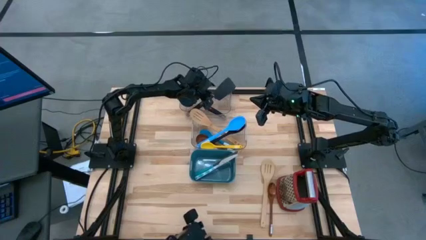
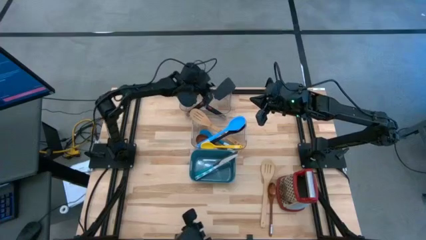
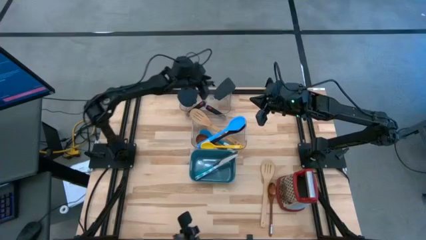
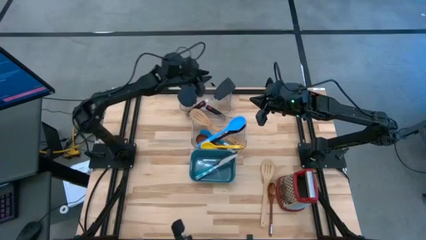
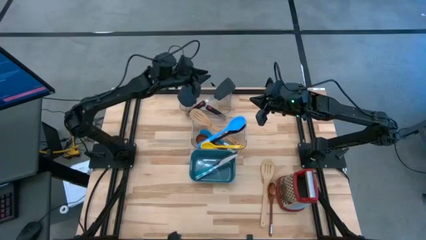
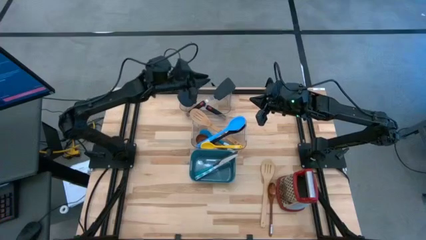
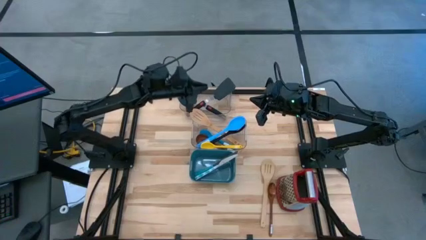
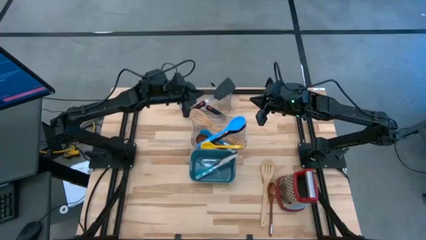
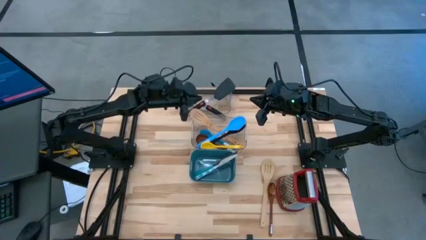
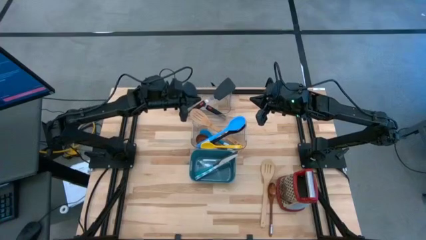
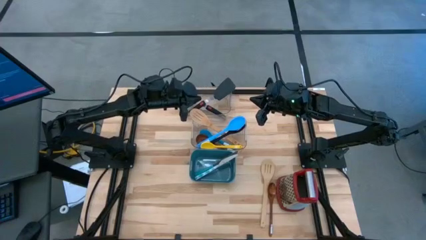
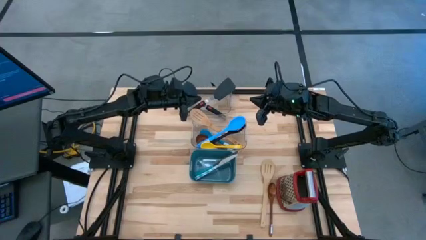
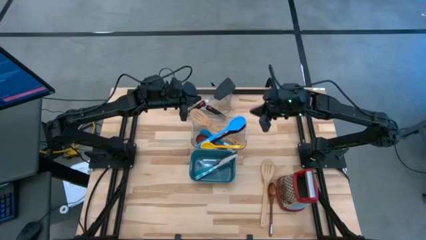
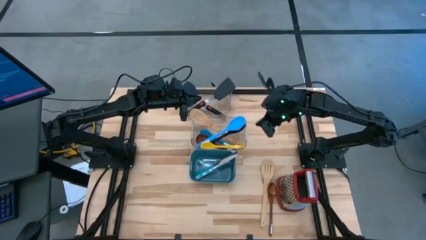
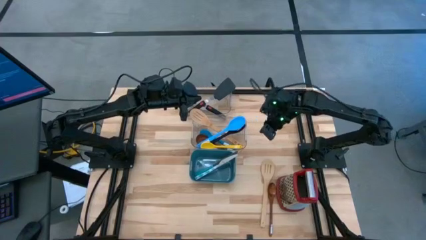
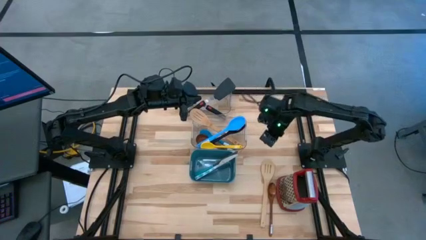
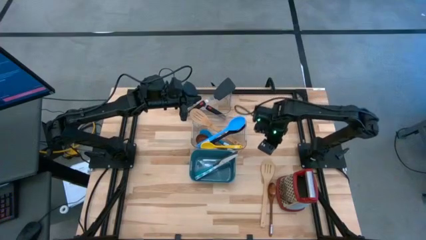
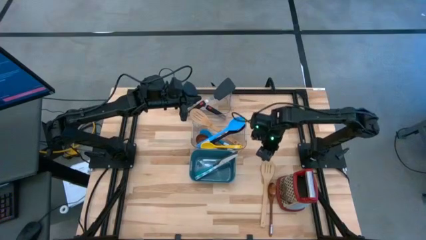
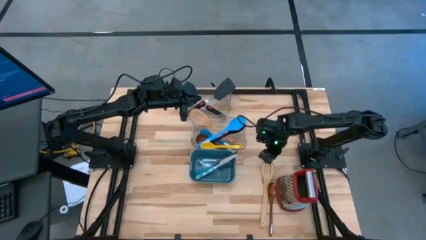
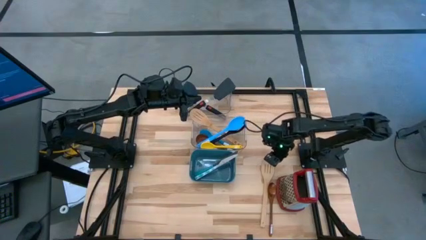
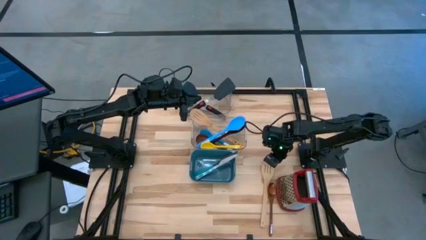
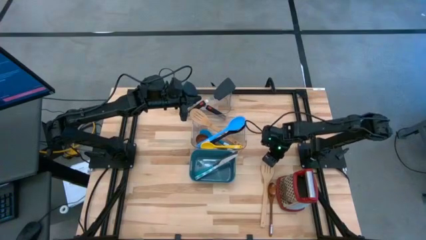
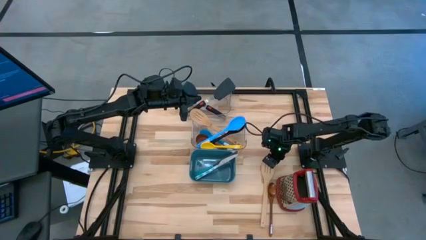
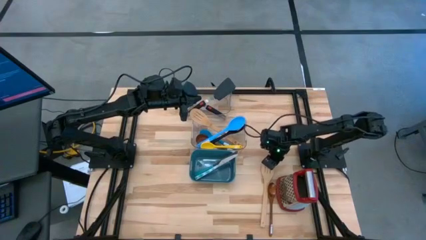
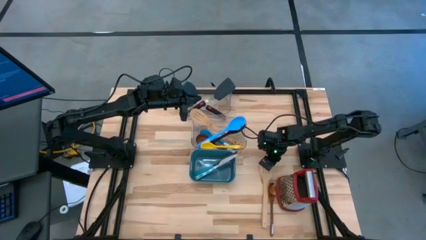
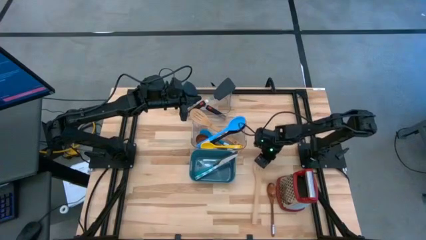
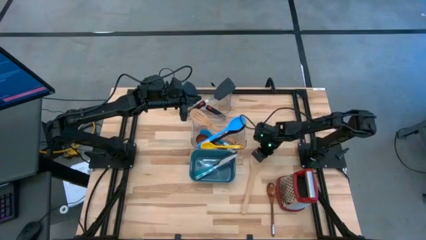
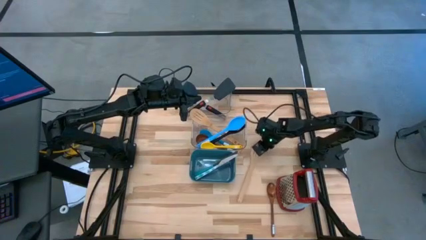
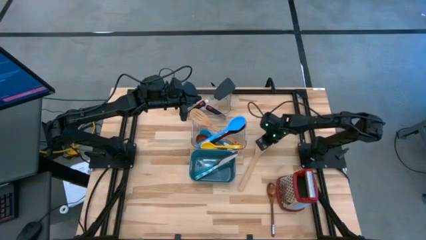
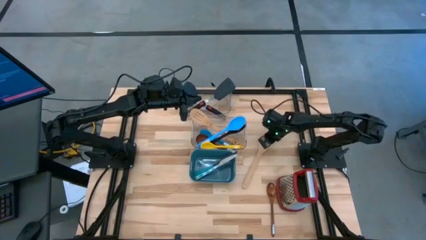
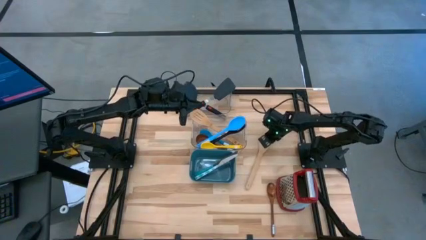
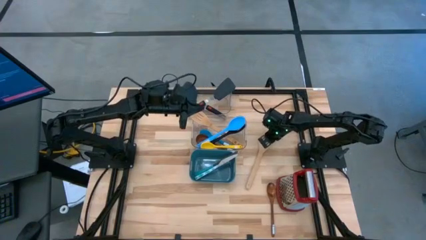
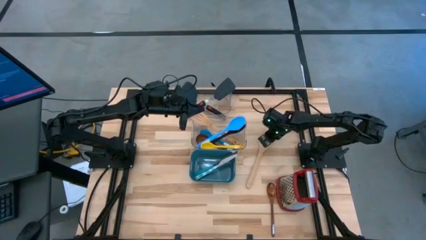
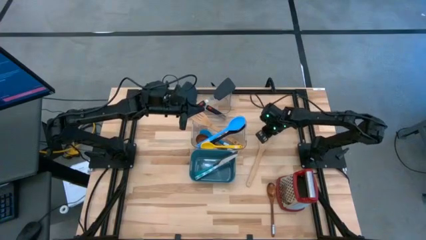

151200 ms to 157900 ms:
Task: Pick & Place Kitchen Items
Adjust the wooden slotted spatula on the table

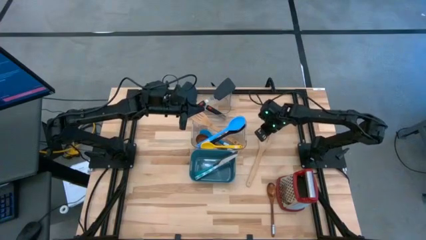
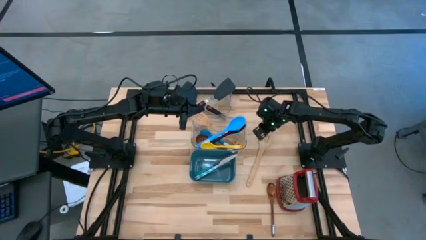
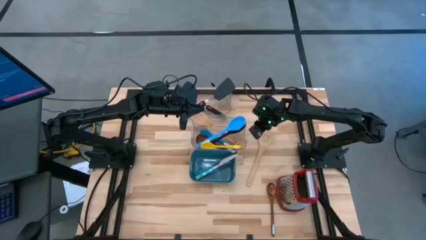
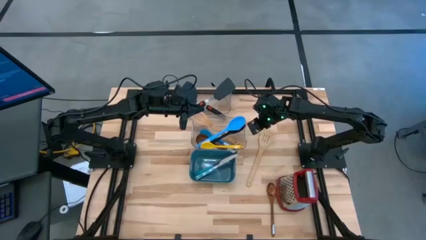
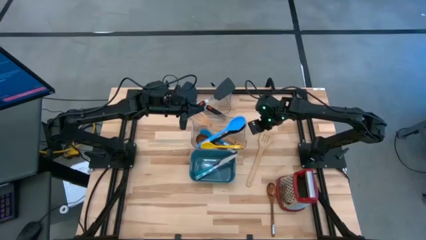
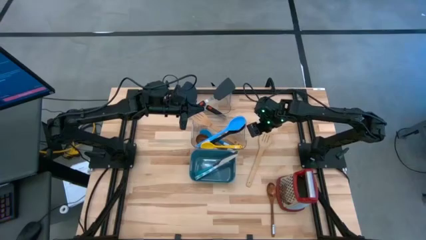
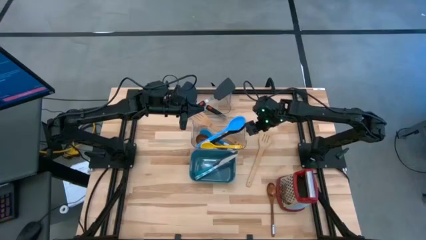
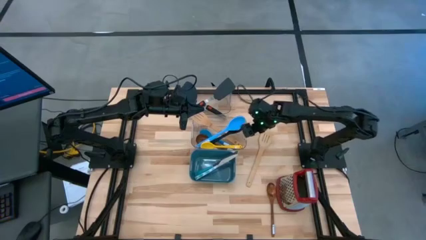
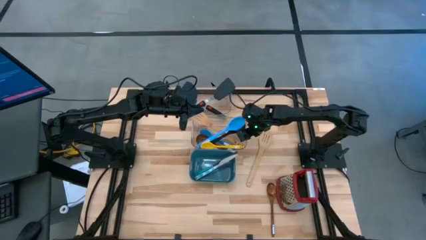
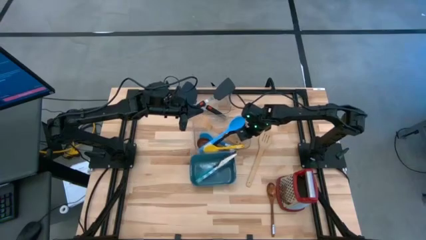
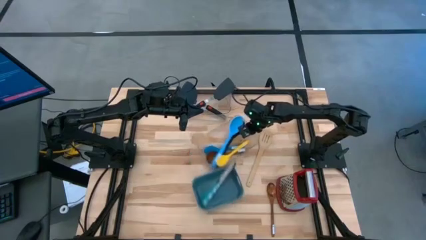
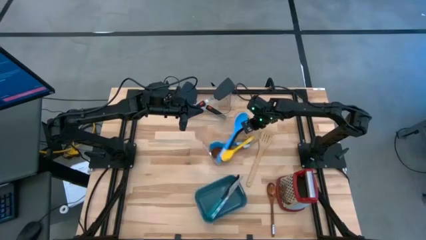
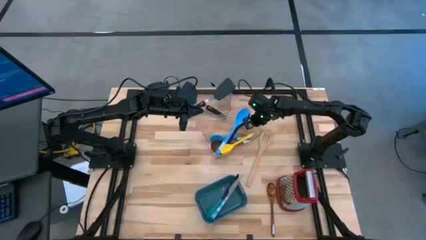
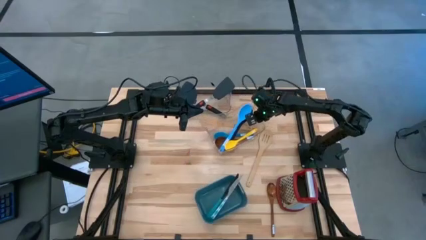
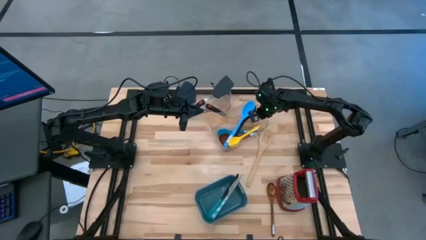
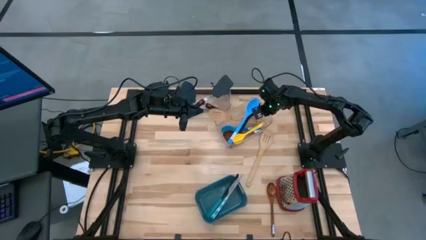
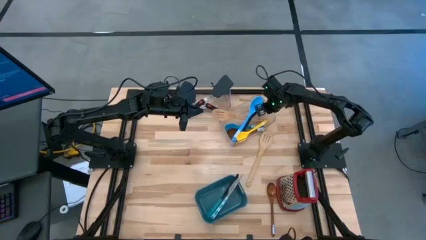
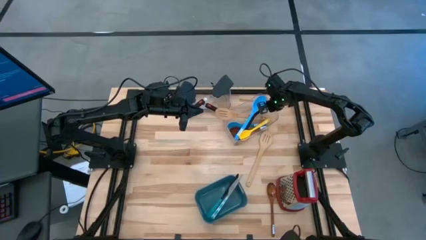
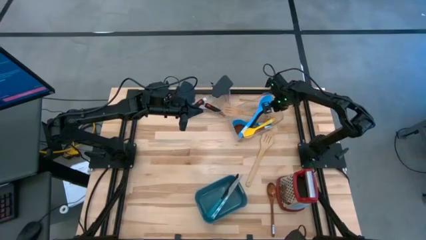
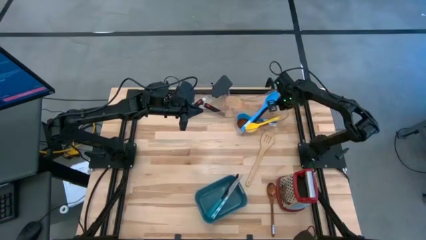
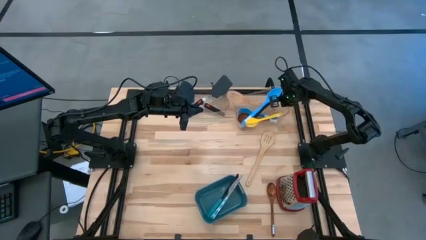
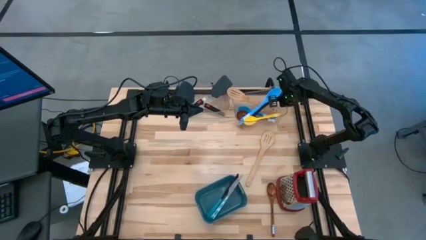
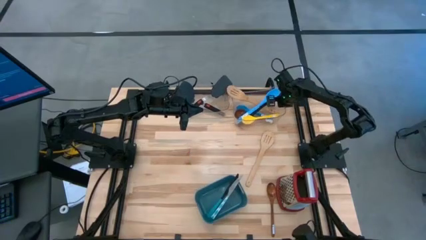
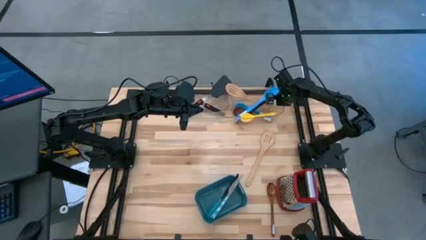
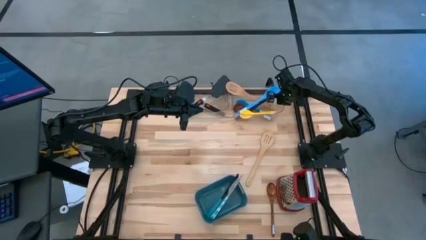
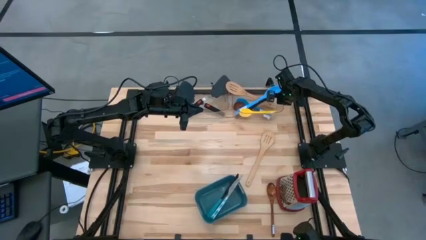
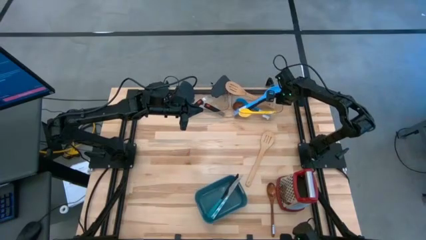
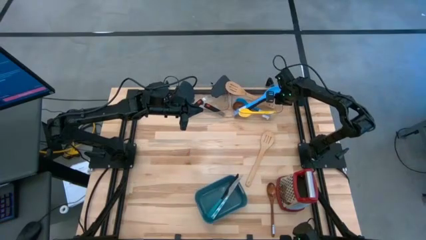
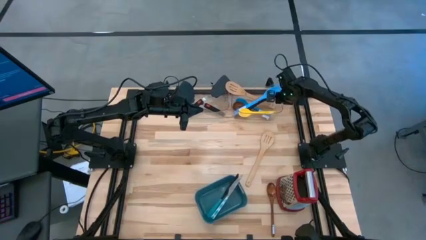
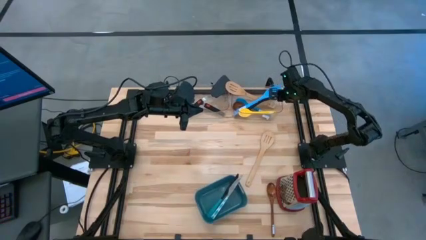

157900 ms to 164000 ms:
Move the bottom transparent bin to the top right of the table

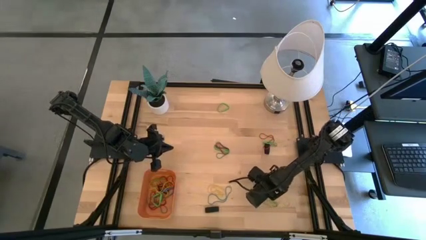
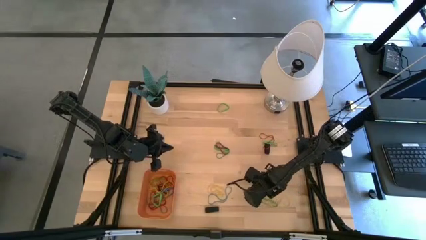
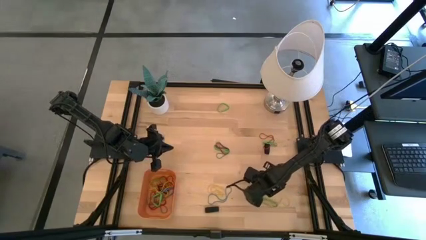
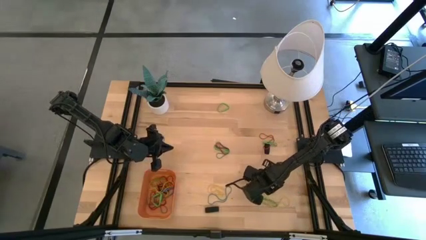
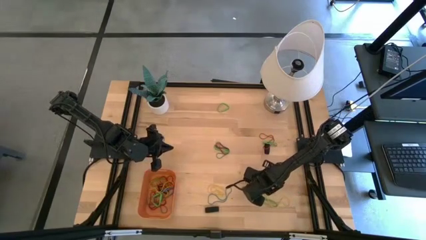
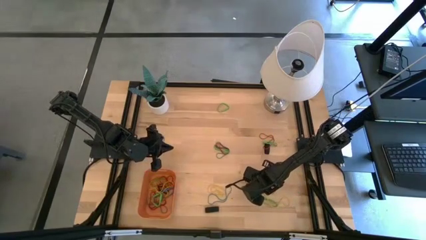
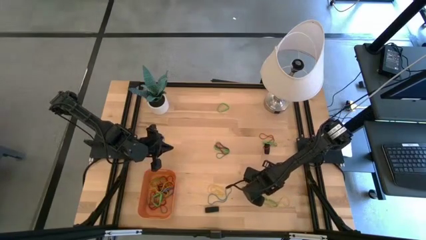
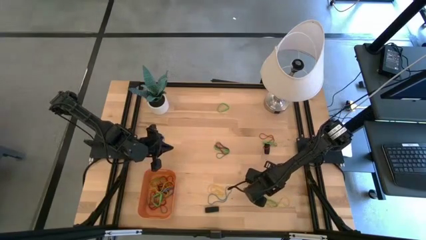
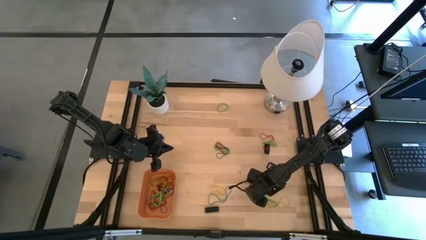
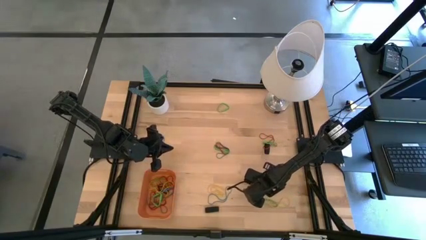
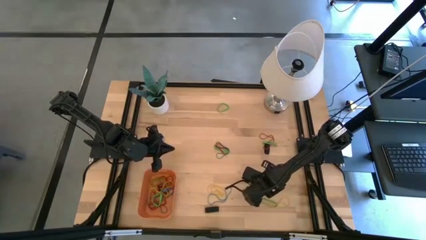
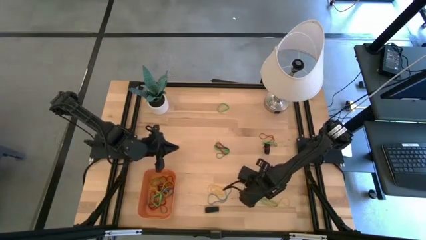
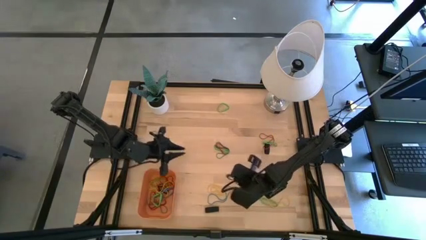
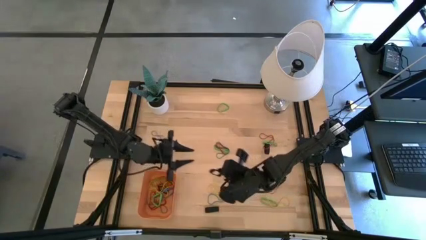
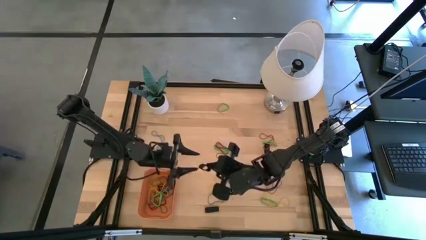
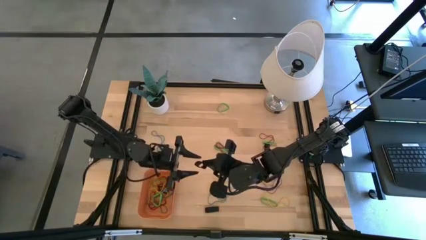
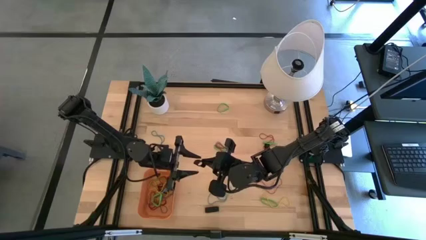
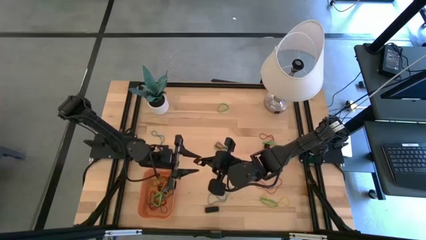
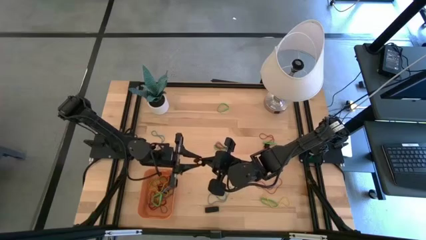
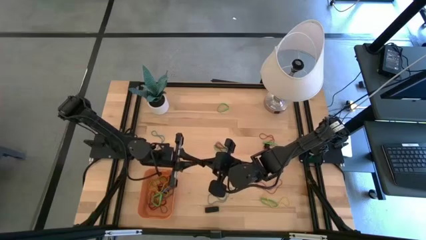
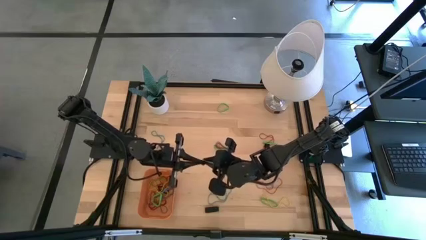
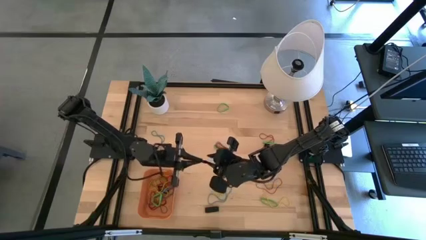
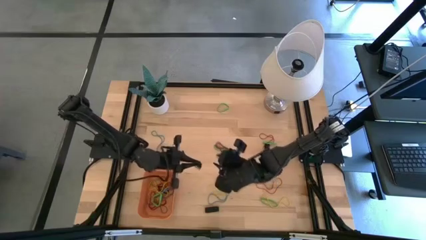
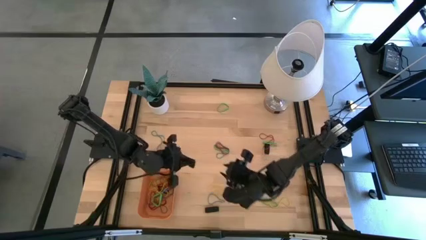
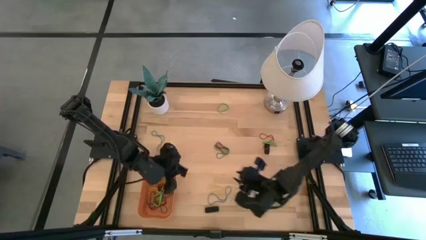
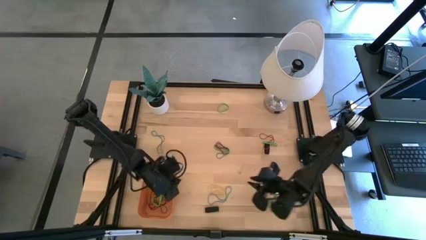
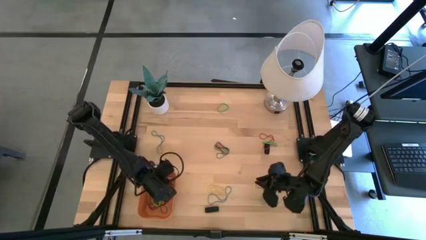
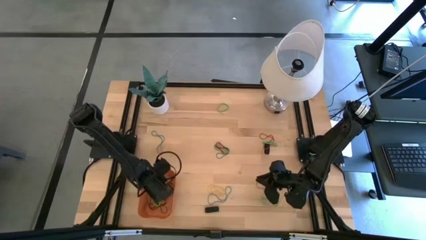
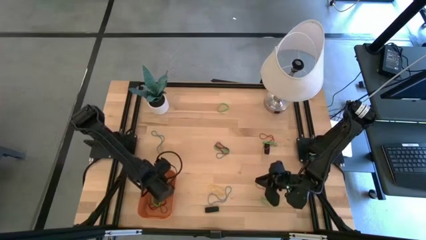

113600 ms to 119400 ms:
Task: Pick and place rubber bands into bin
Put the black rubber band into the orange bin
